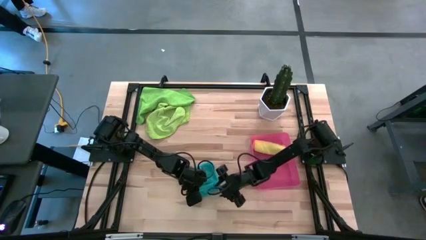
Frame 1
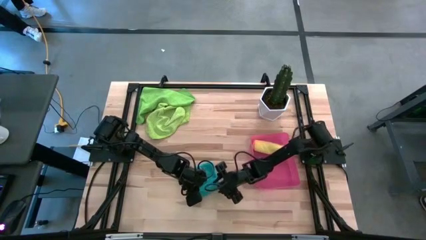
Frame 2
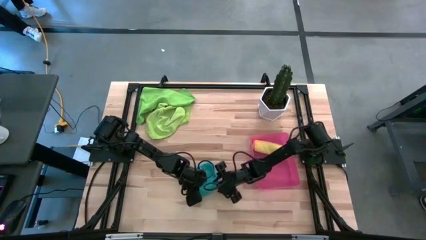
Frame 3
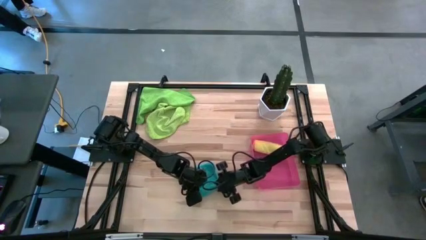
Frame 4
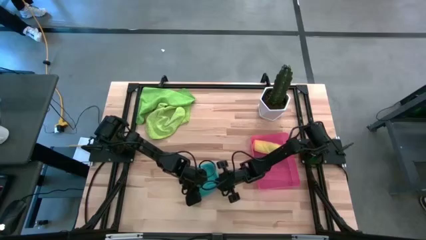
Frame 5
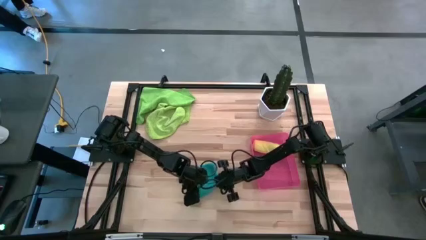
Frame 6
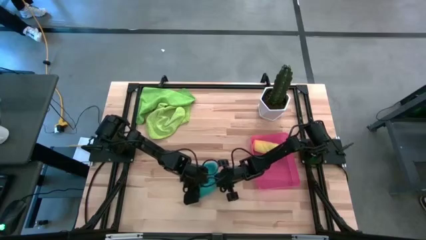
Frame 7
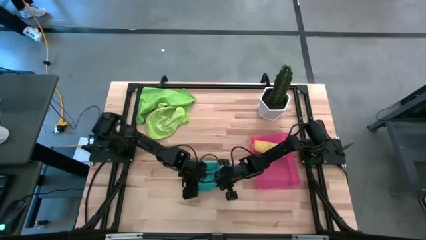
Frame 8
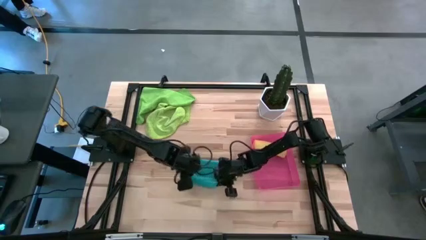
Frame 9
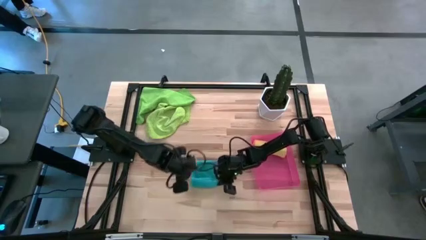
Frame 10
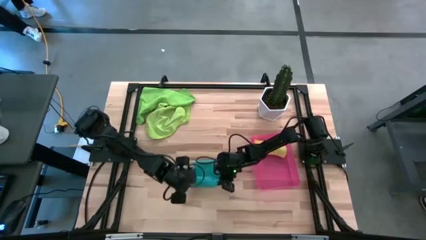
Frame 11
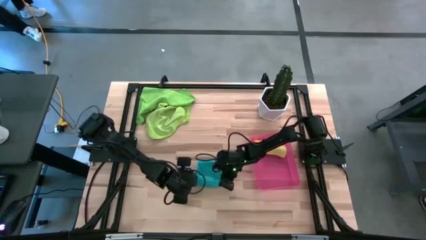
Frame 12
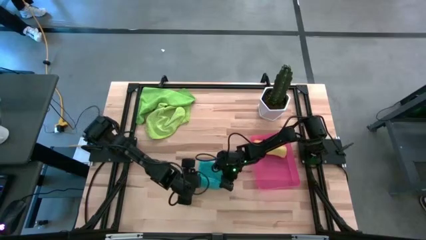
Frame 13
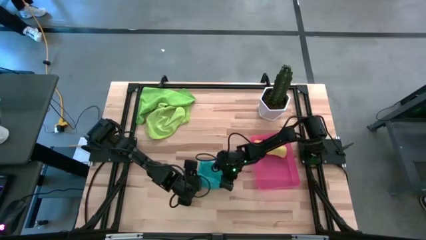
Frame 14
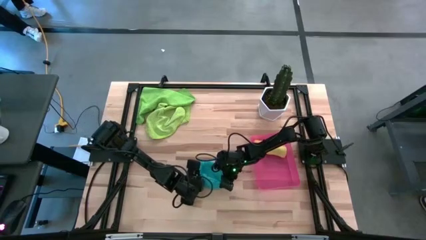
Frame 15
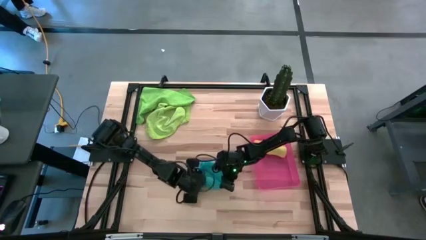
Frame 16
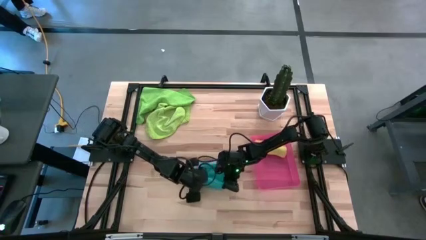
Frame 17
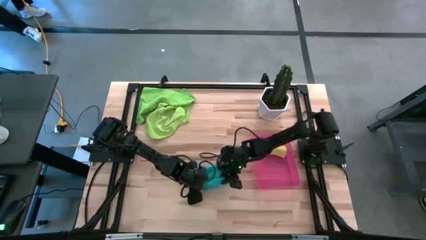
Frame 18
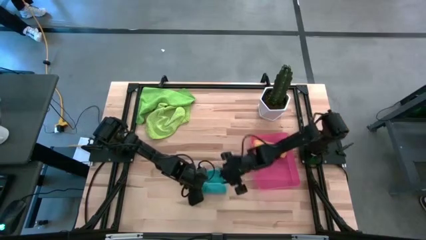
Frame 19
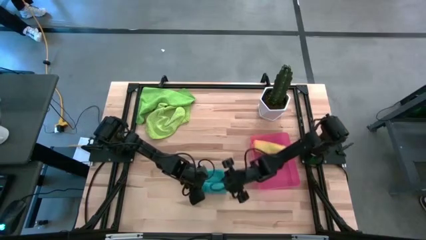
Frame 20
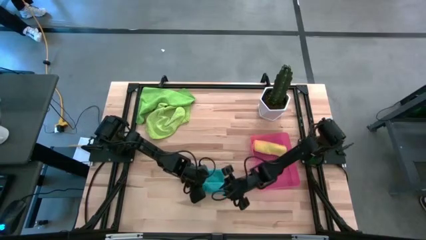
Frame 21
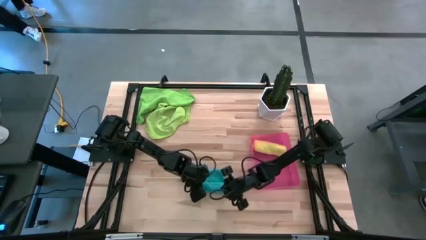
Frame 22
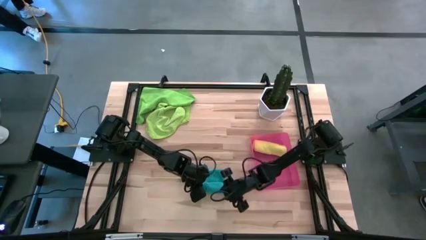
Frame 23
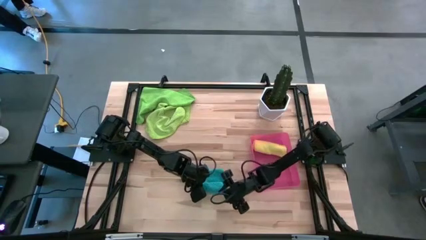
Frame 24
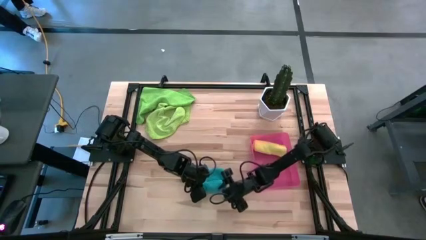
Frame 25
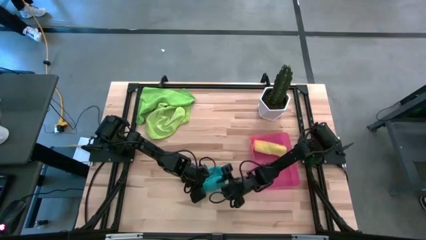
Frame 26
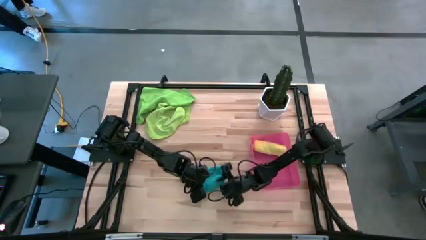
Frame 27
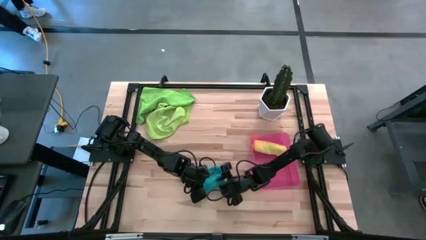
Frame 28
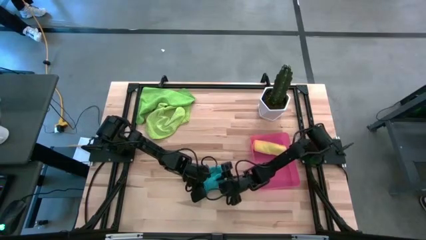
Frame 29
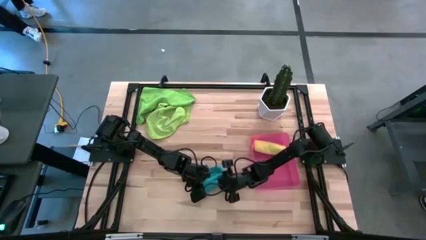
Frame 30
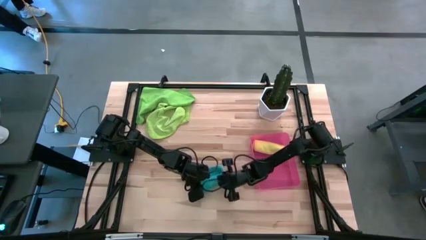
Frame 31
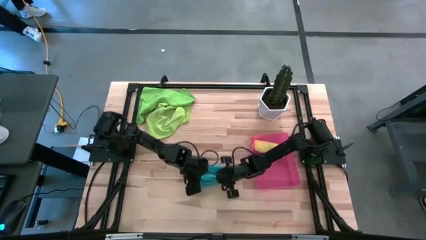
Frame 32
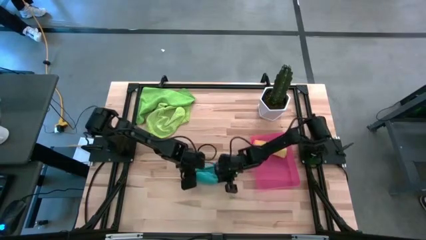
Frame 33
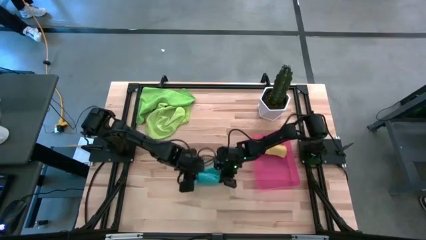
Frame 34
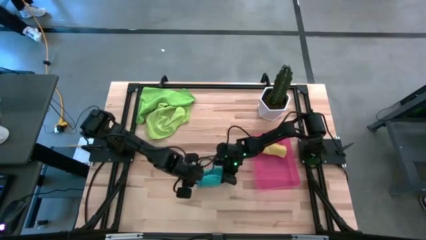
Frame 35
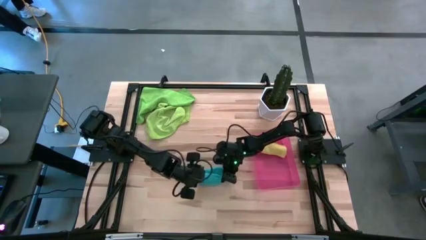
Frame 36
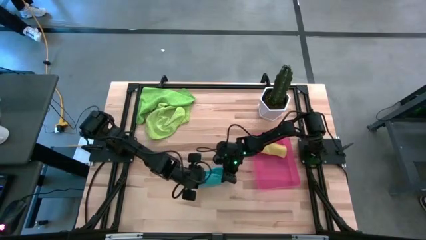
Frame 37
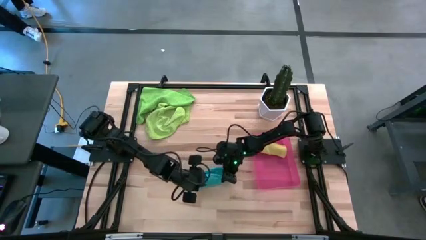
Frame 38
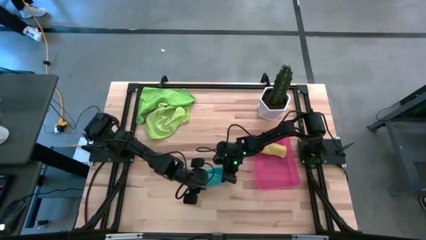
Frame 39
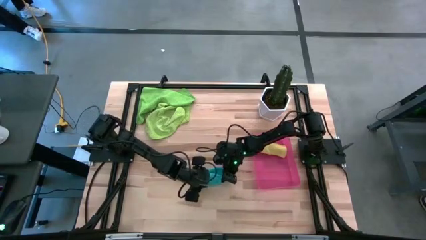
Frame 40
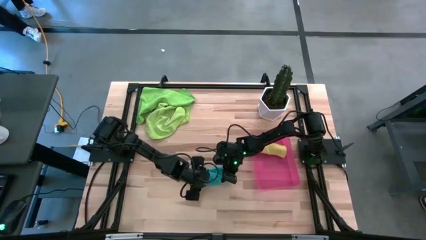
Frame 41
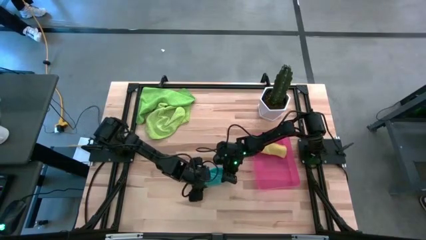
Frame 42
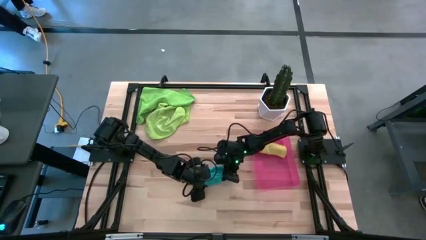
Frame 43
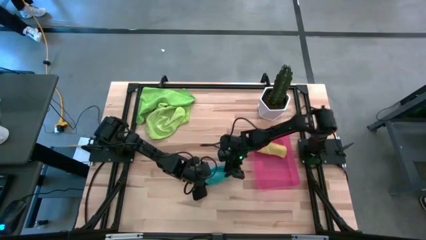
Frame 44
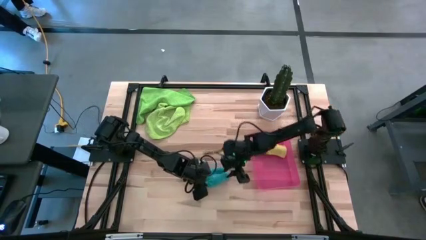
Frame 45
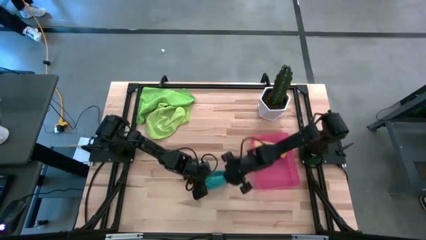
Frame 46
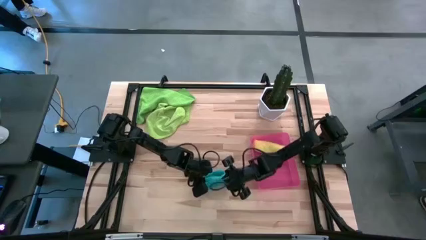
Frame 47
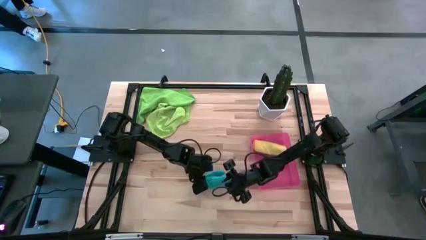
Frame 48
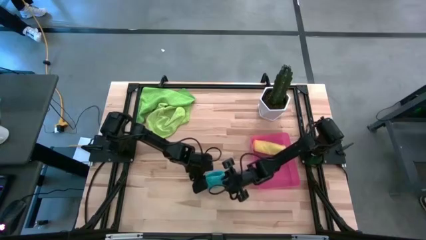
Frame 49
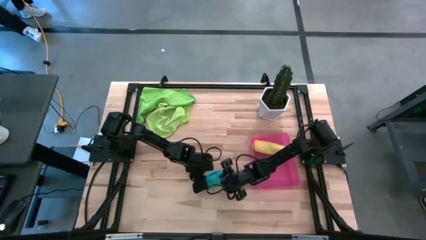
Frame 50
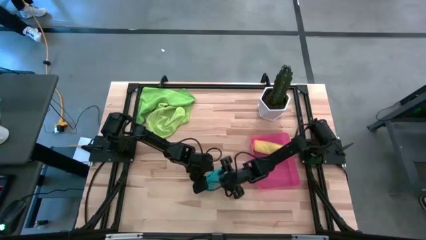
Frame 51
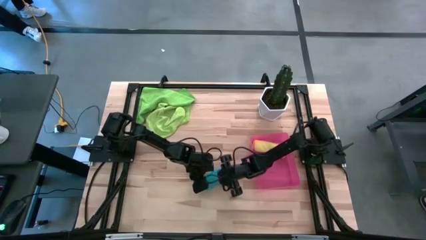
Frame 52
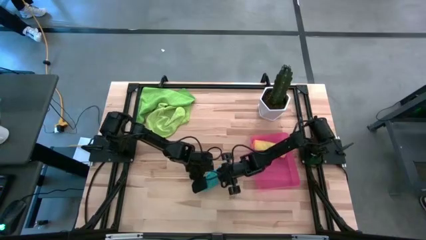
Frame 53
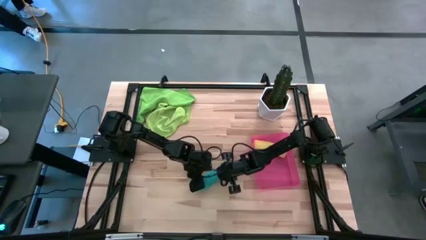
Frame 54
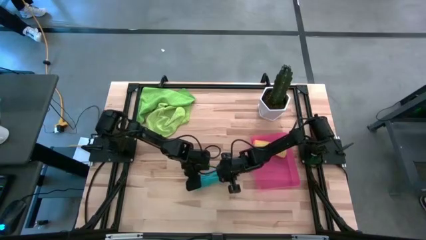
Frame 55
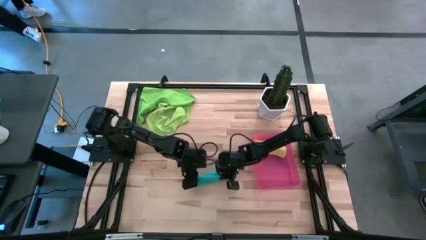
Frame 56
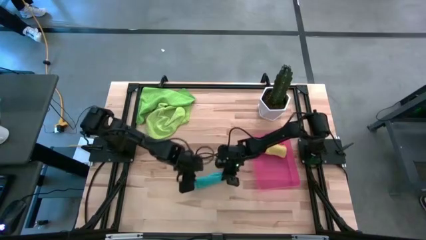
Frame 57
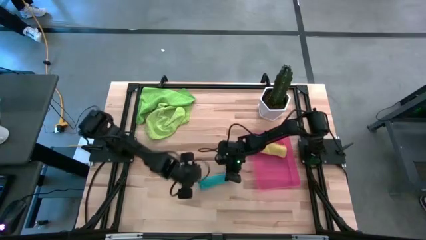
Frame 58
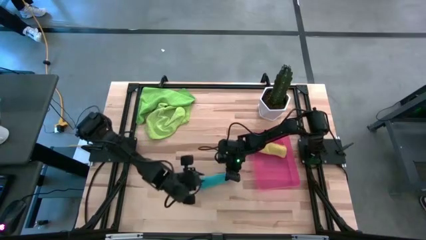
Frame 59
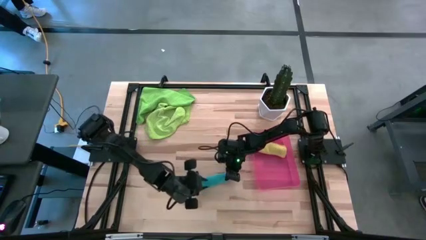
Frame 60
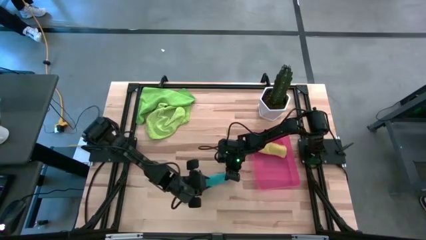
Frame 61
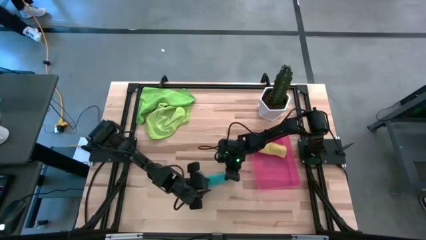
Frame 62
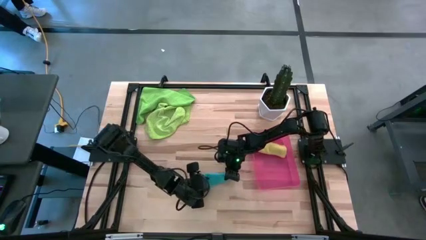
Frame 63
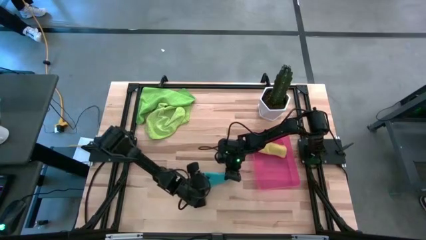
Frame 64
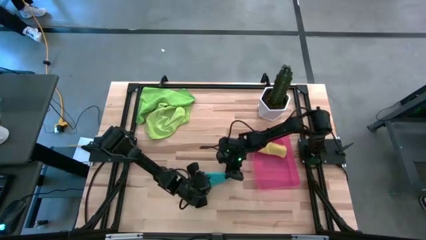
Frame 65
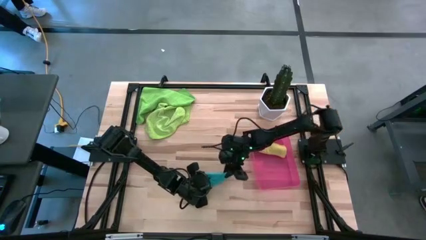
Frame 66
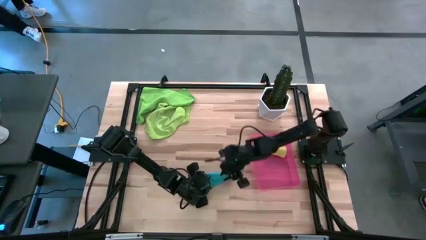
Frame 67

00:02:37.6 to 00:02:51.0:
Task: Roll microfiber towels into tight, uniform cylinder then place into a basket
Roll the blue microfiber towel

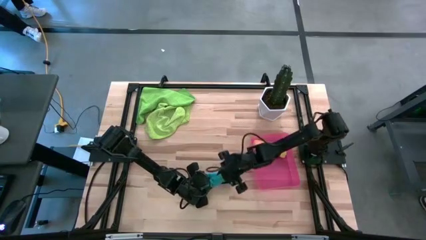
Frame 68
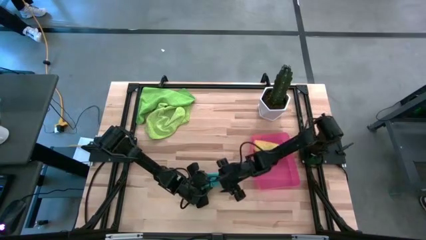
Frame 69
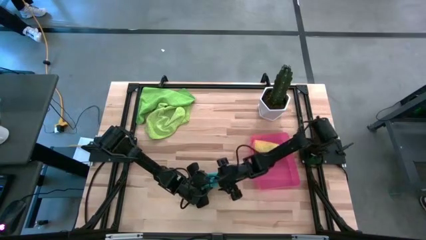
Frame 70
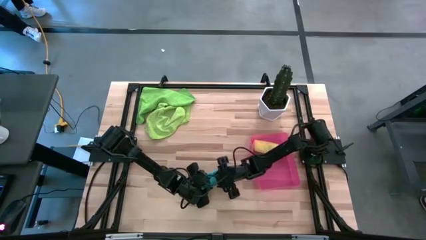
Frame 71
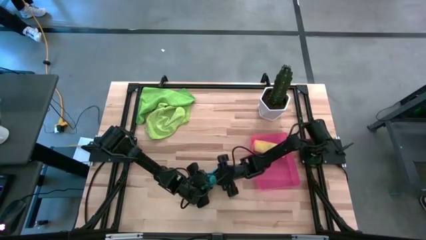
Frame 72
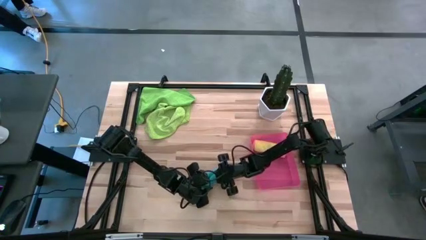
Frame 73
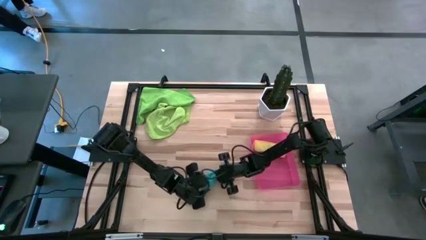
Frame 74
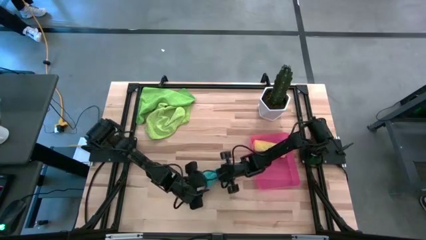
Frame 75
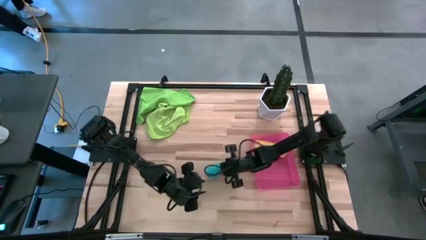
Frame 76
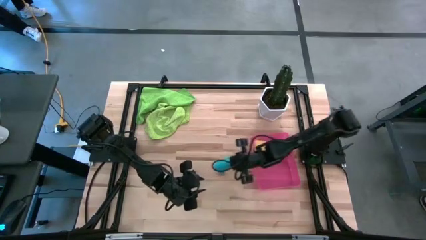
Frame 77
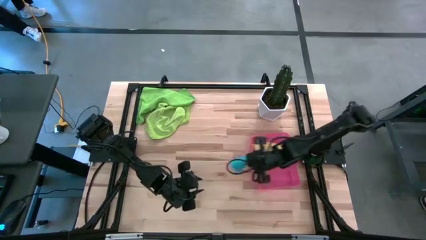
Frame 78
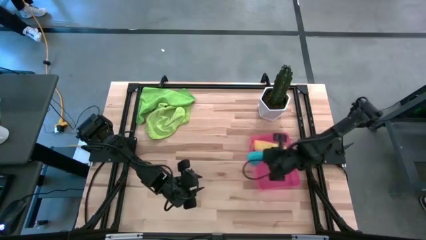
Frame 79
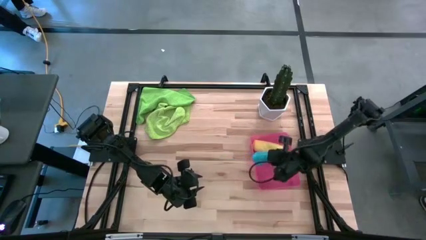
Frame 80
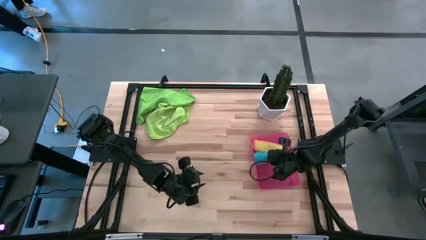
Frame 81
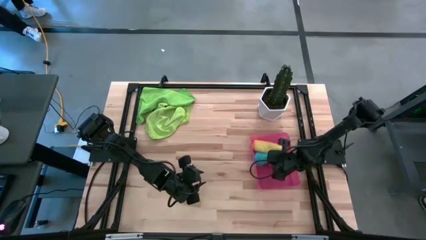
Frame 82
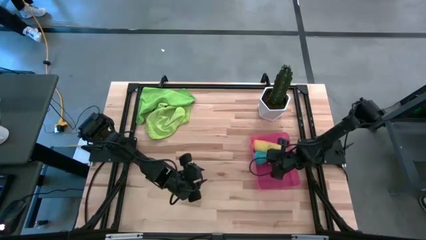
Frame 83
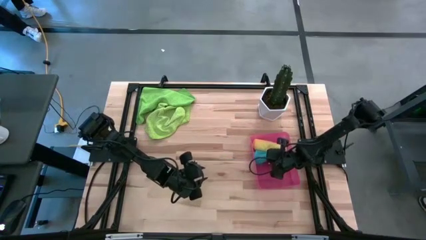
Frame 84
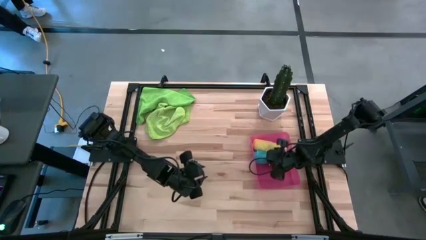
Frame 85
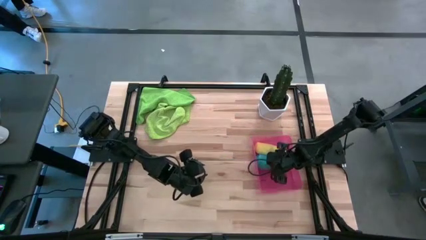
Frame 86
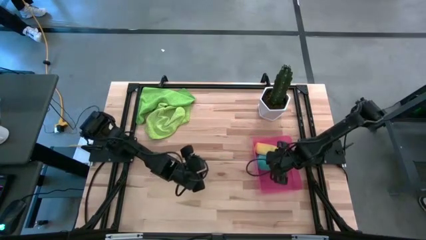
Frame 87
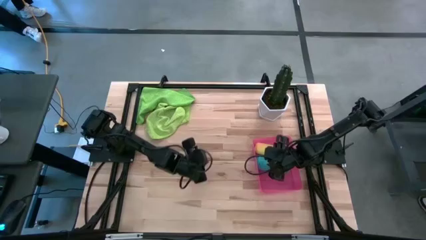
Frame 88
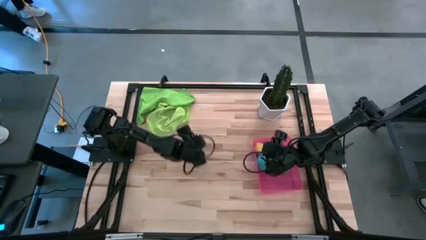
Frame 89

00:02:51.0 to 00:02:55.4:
Put the blue microfiber towel into the pink bin
